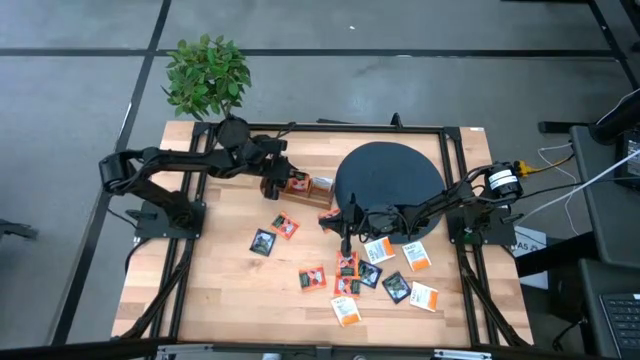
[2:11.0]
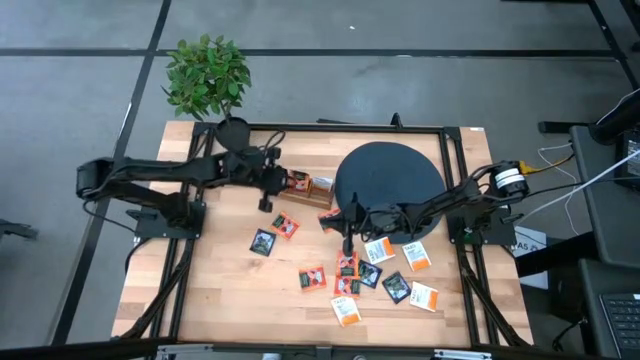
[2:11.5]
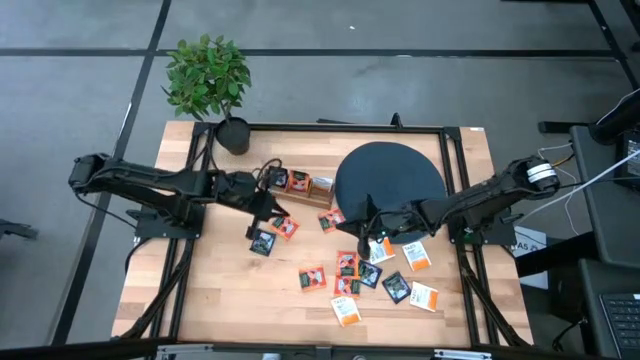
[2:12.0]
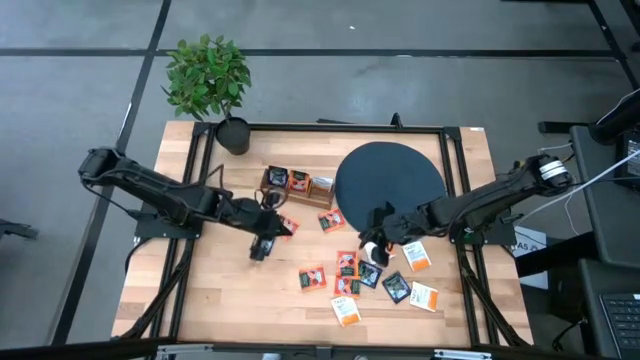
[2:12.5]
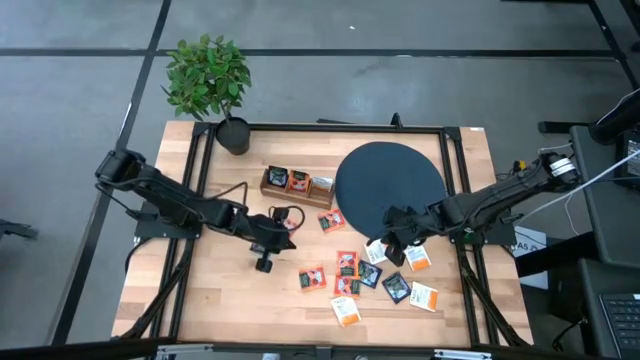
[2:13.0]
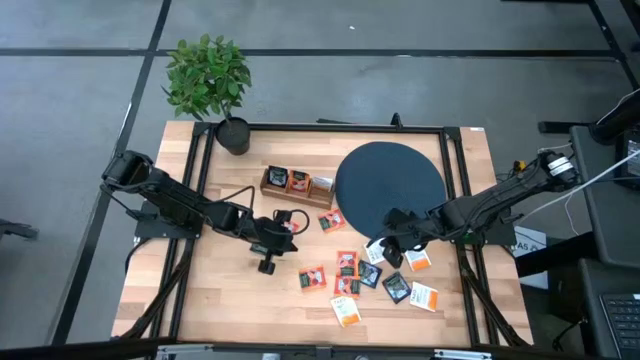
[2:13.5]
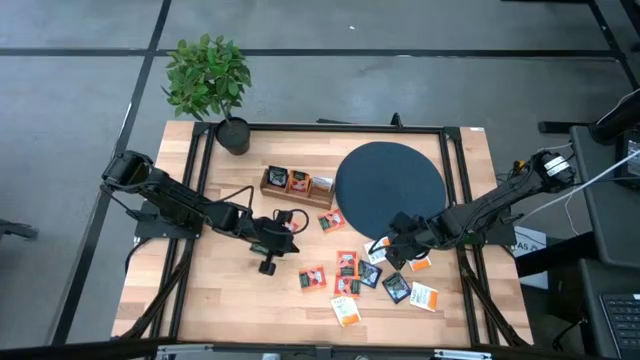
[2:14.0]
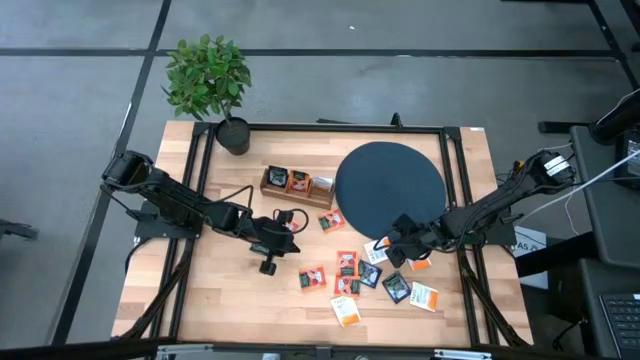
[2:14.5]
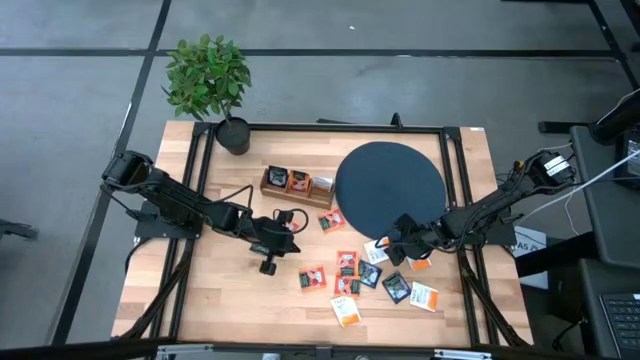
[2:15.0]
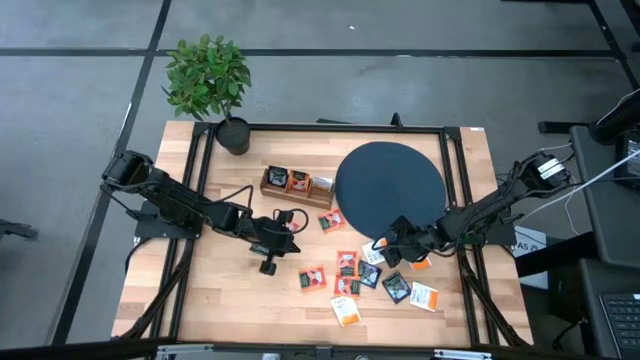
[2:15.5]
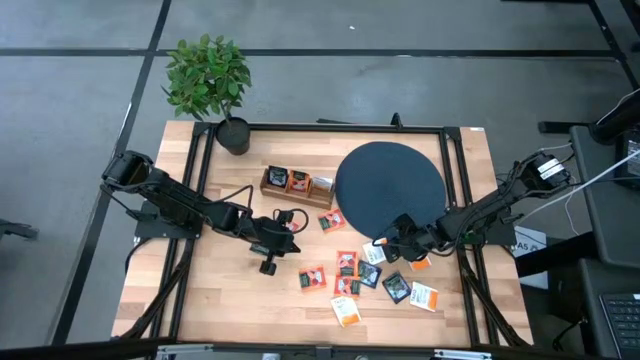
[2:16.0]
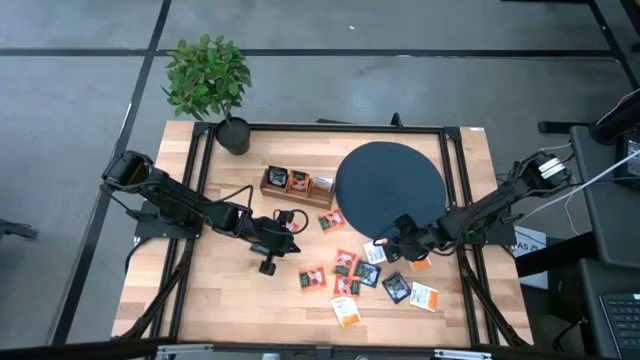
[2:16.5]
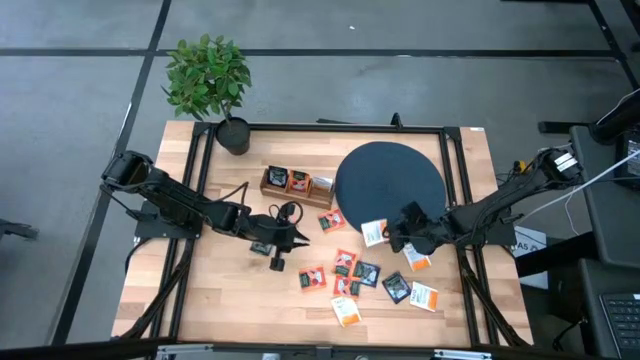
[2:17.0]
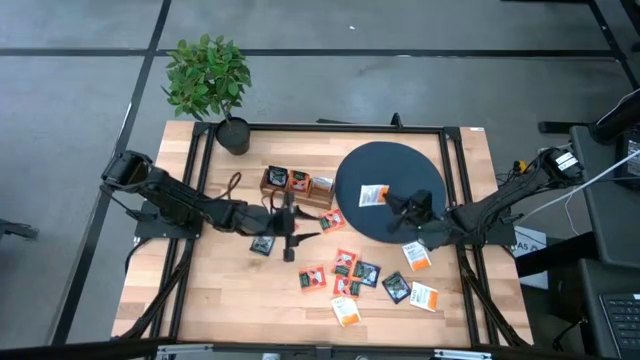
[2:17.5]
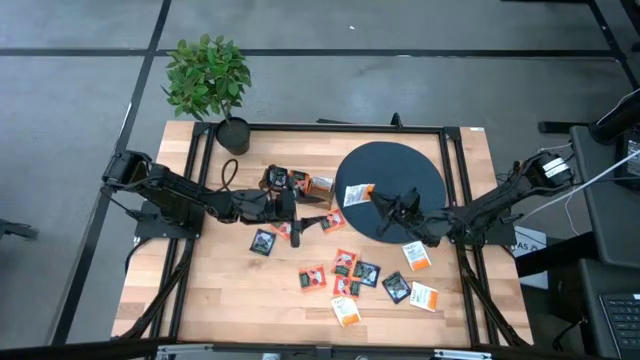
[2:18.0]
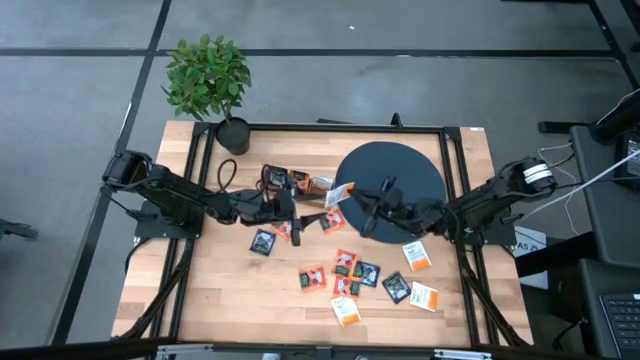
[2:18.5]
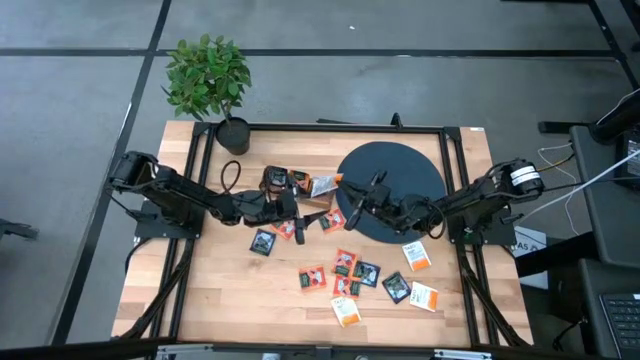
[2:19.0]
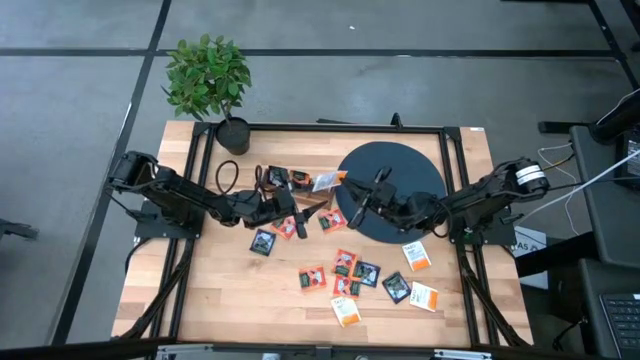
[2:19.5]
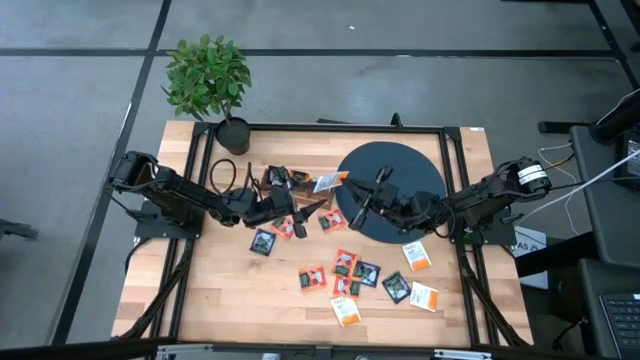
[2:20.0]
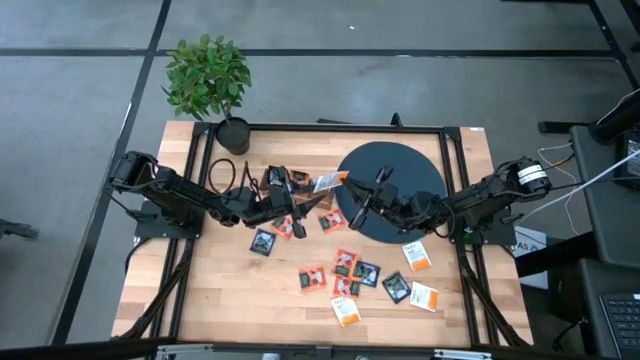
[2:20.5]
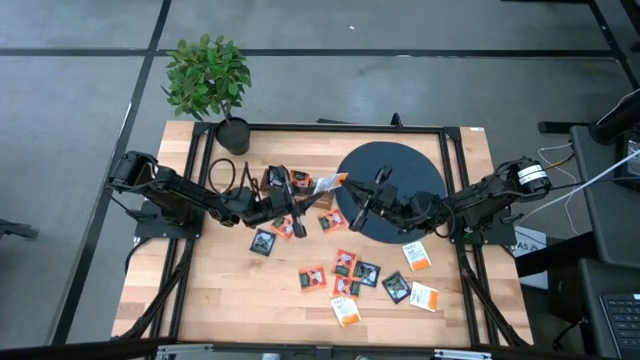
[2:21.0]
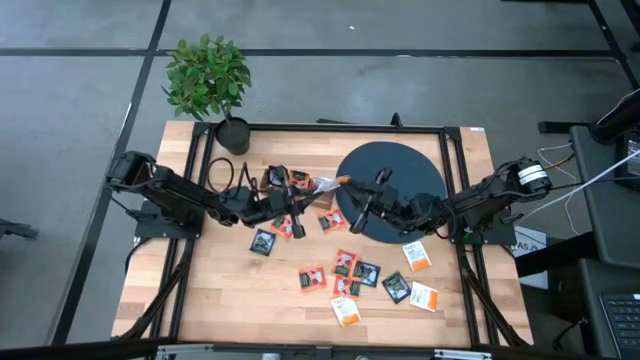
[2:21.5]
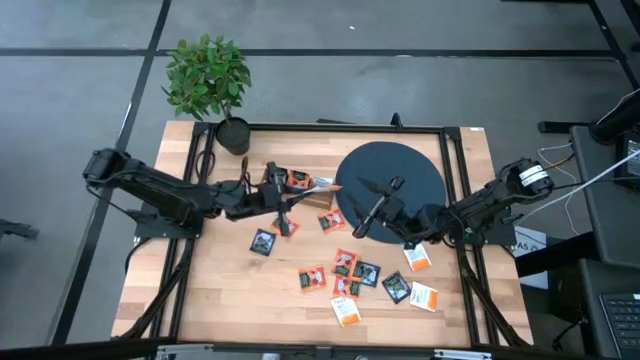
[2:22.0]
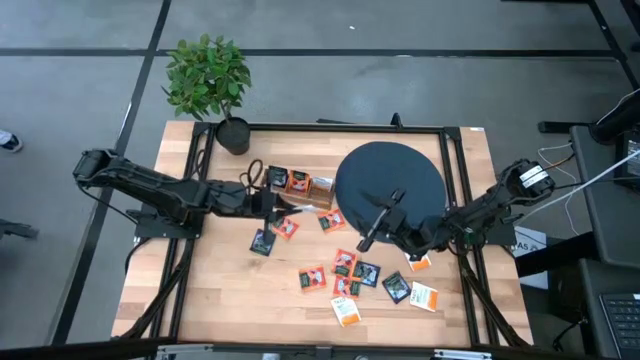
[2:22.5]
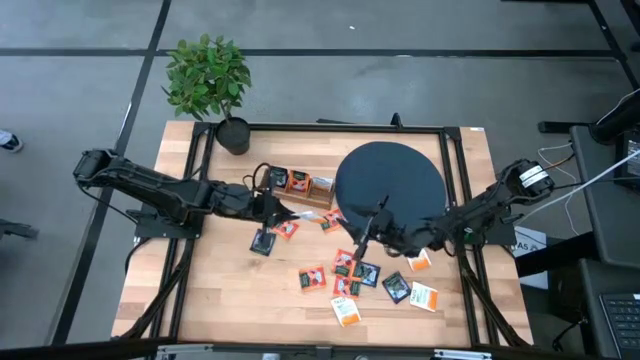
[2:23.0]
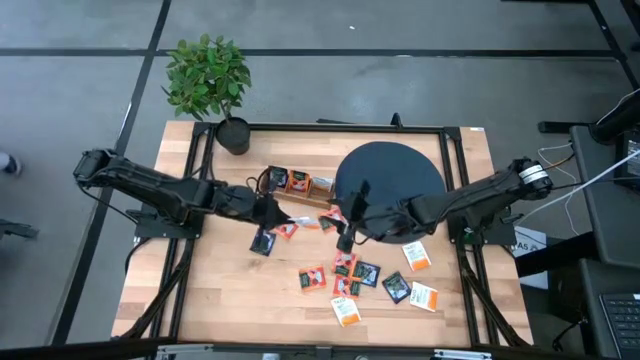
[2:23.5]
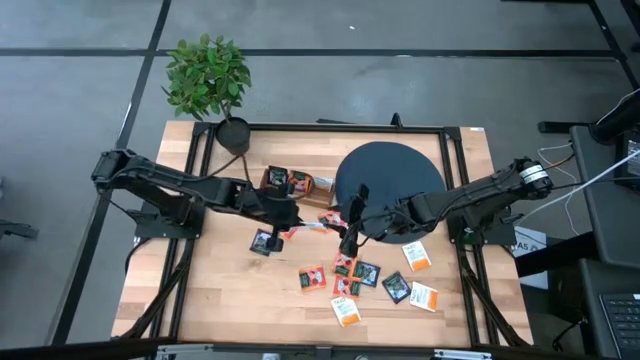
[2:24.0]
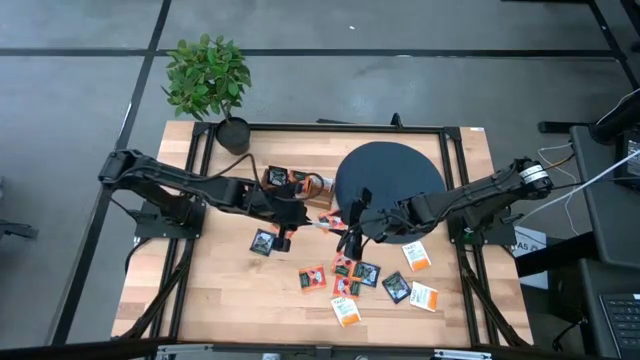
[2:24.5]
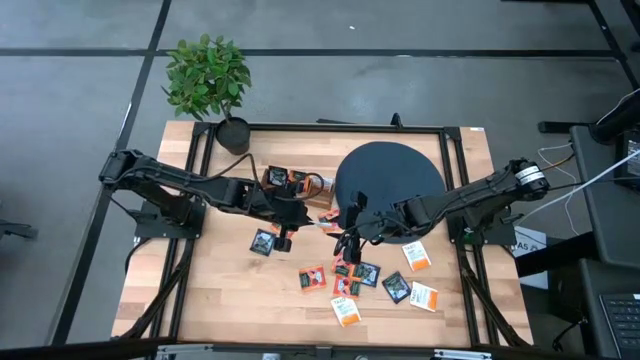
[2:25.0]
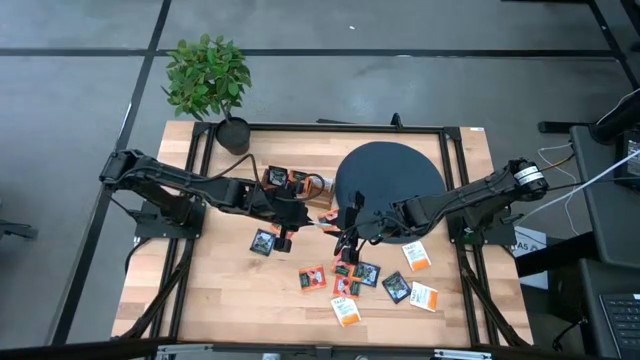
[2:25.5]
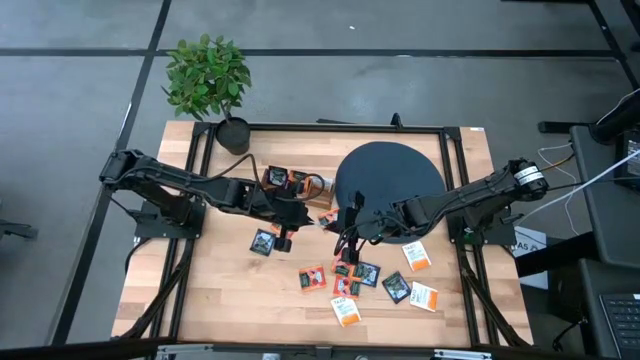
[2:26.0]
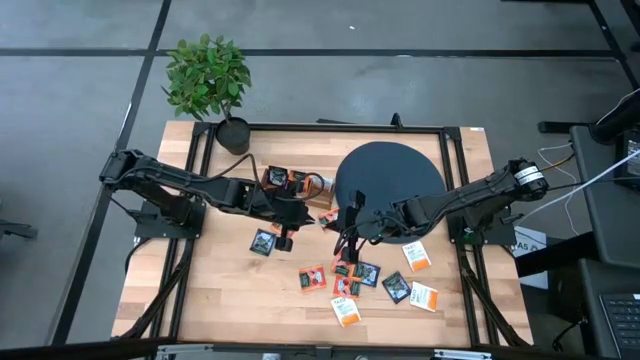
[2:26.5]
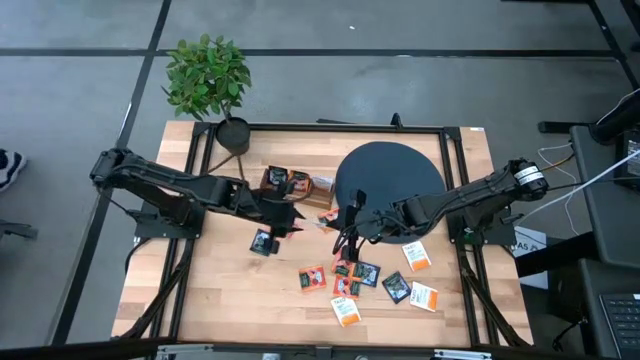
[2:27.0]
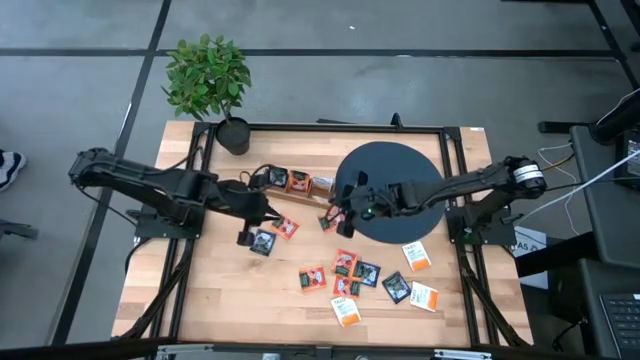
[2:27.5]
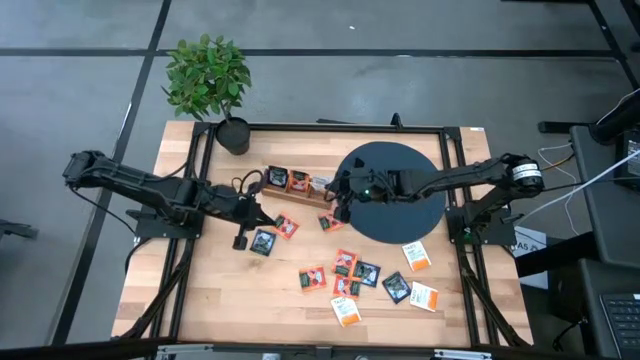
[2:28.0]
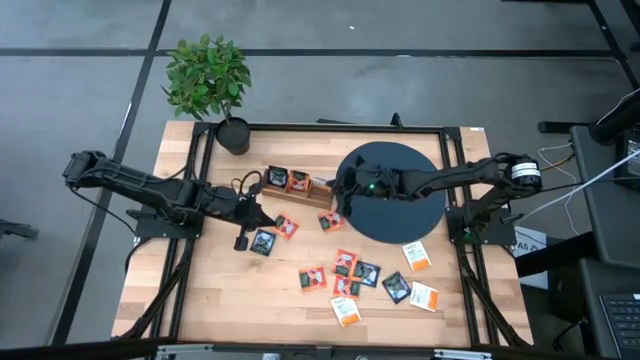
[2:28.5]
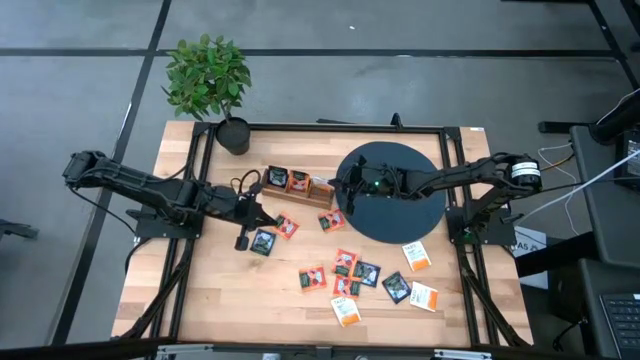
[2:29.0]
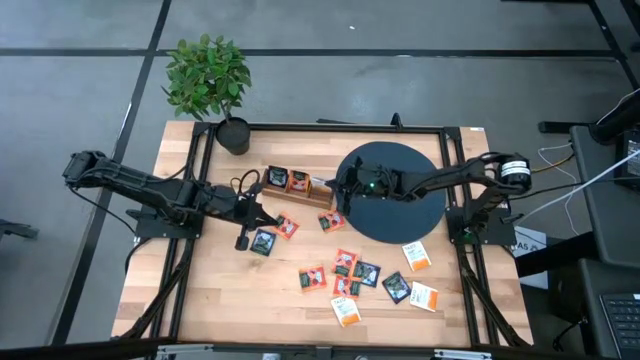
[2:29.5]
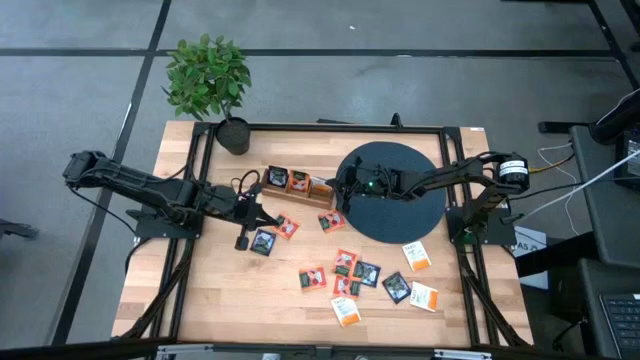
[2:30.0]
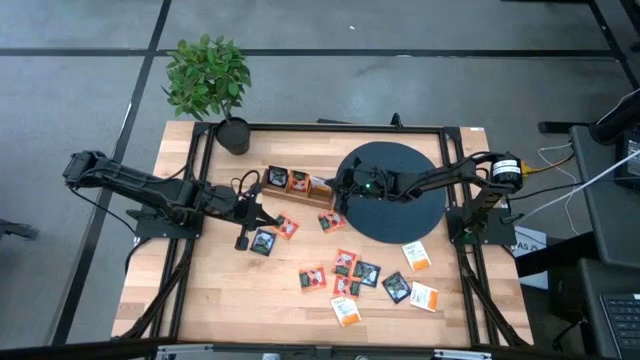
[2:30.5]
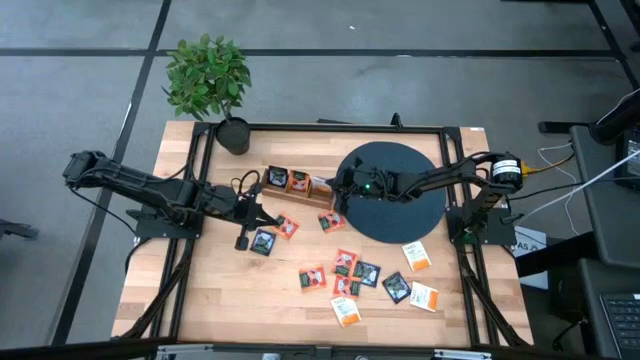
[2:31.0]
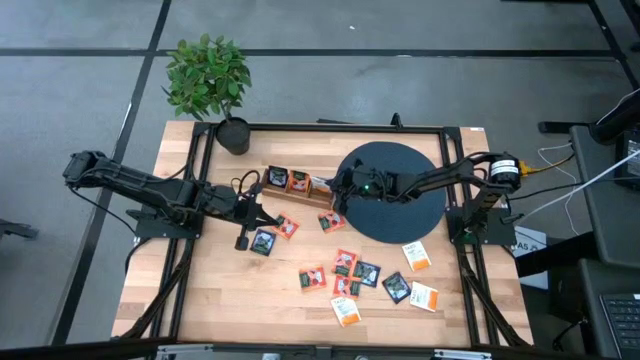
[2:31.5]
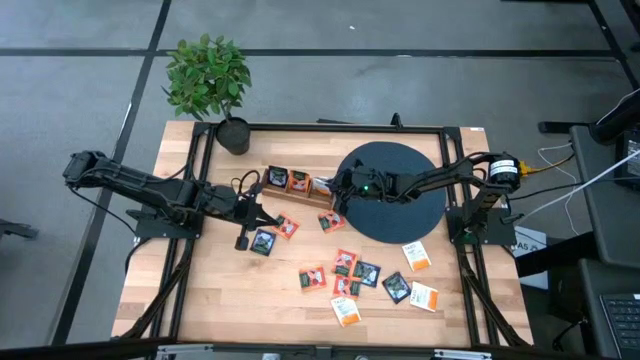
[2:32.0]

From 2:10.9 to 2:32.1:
Task: Pick & Place Tea
Put the white tea bag into the right section of the wooden organizer
